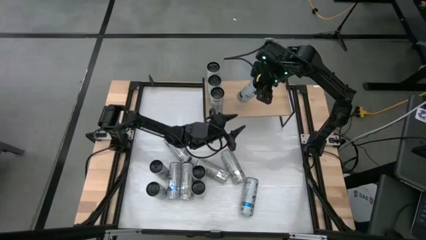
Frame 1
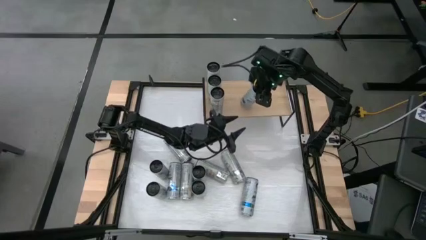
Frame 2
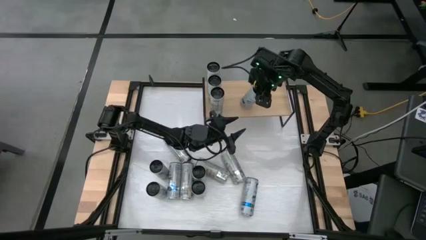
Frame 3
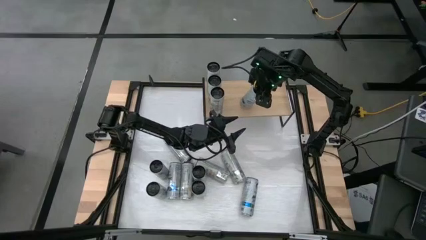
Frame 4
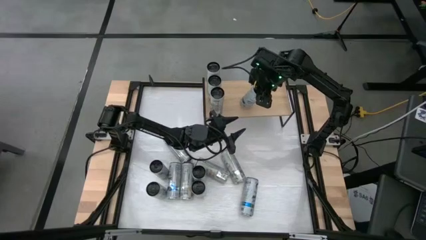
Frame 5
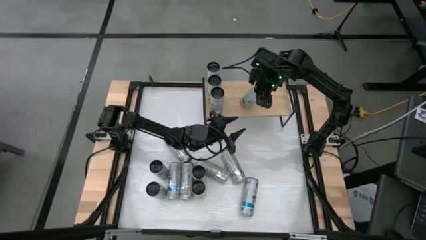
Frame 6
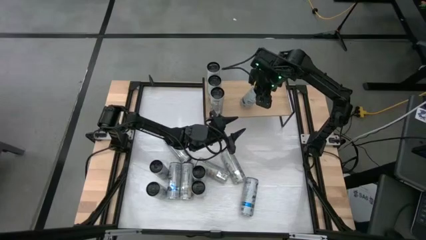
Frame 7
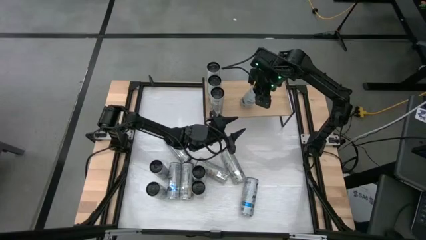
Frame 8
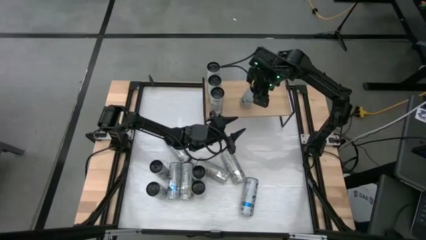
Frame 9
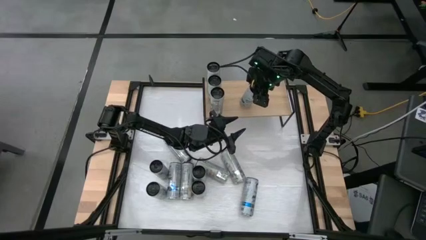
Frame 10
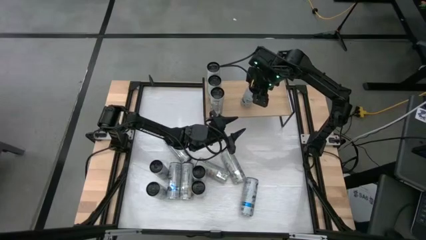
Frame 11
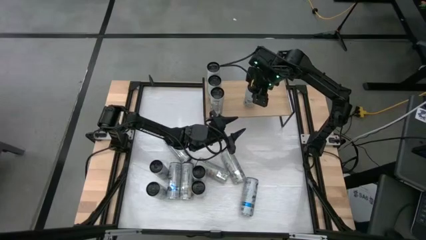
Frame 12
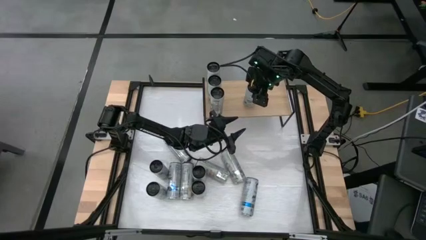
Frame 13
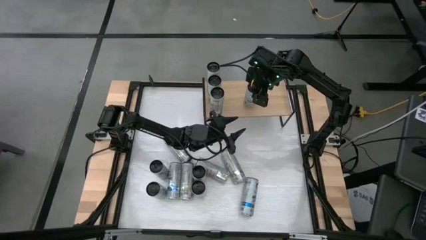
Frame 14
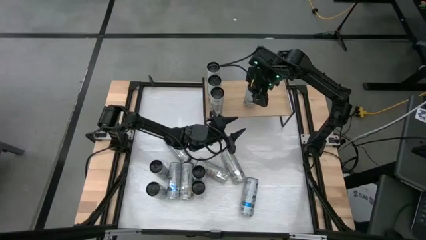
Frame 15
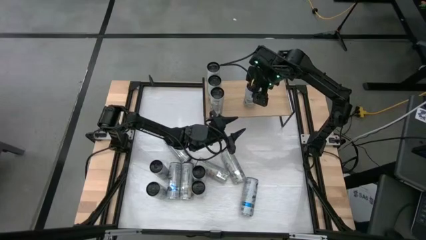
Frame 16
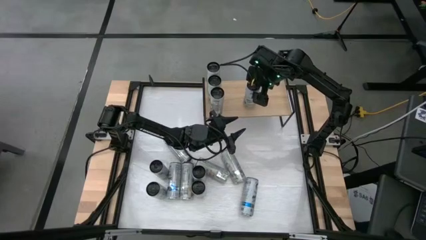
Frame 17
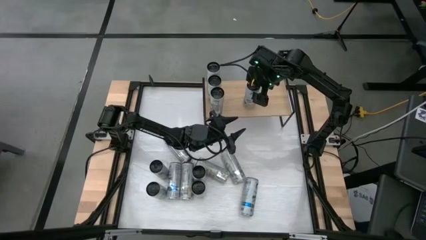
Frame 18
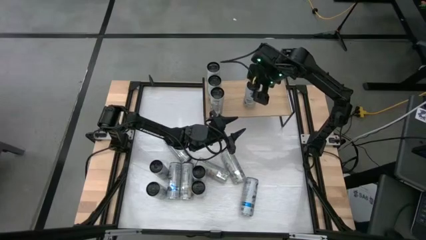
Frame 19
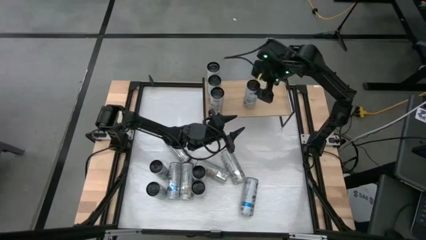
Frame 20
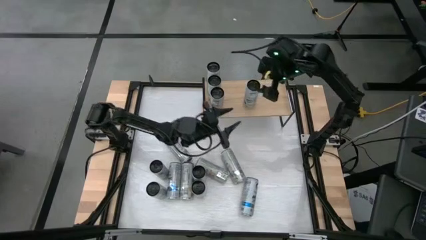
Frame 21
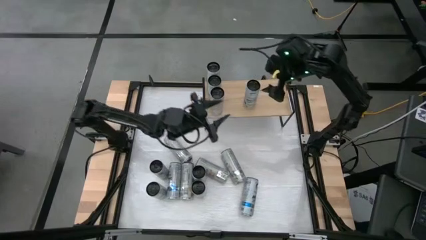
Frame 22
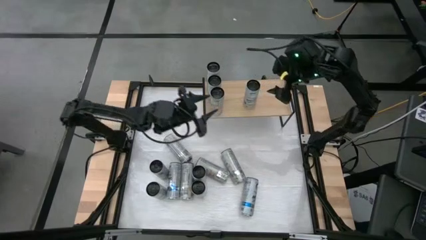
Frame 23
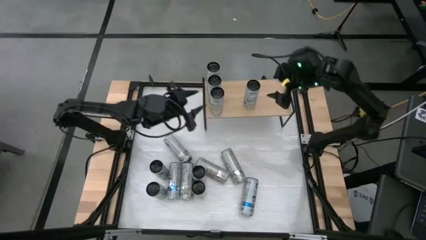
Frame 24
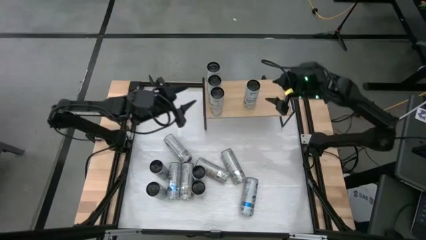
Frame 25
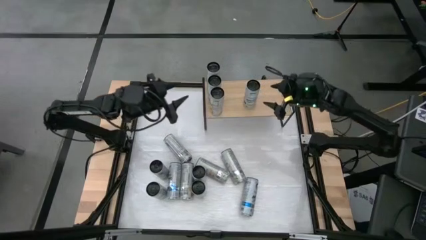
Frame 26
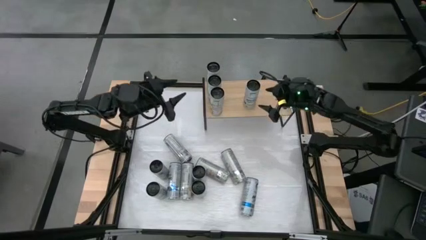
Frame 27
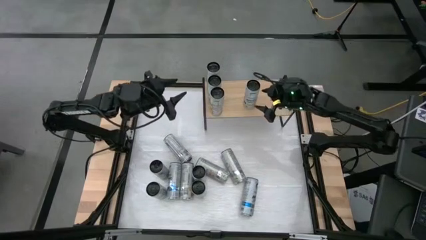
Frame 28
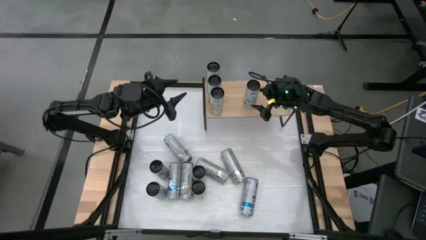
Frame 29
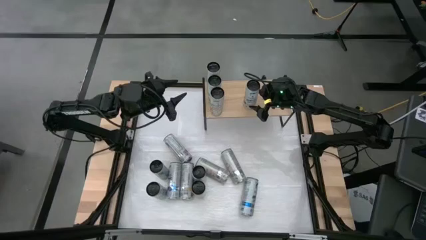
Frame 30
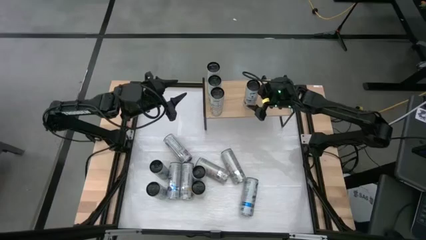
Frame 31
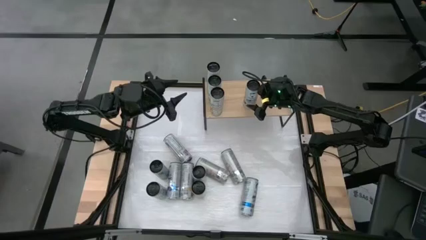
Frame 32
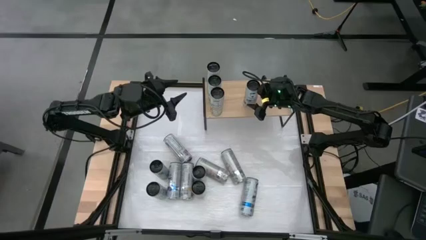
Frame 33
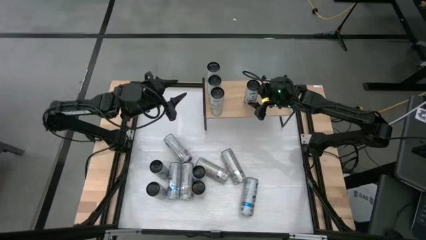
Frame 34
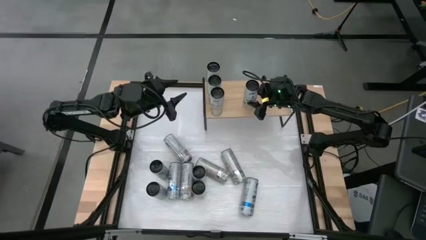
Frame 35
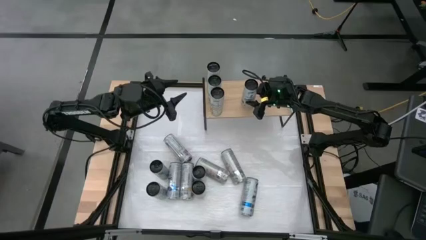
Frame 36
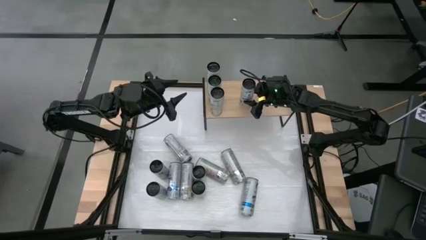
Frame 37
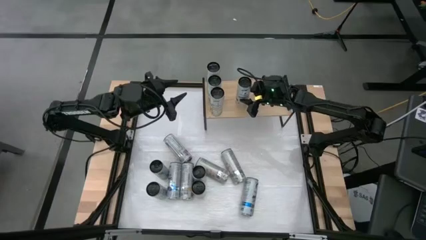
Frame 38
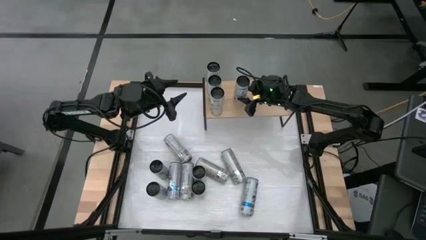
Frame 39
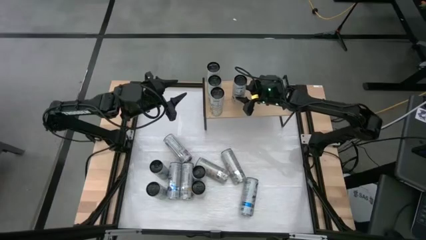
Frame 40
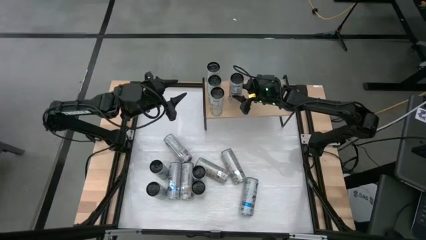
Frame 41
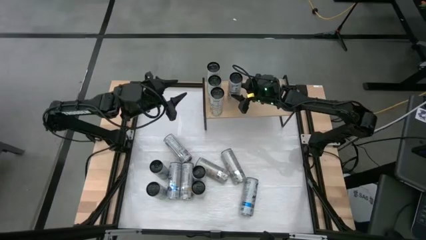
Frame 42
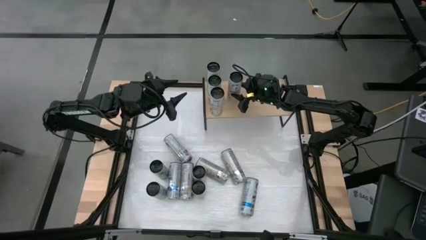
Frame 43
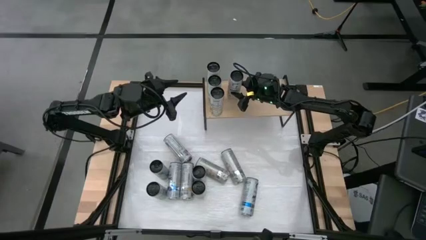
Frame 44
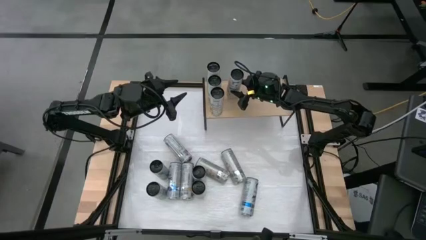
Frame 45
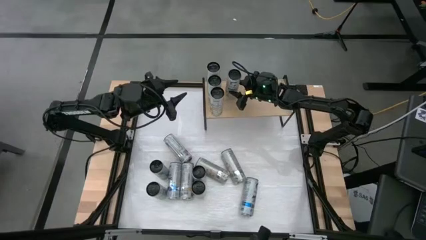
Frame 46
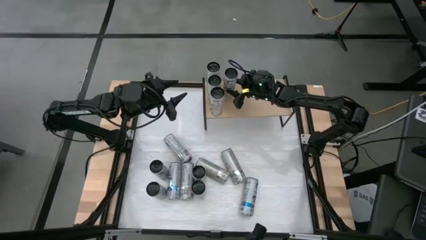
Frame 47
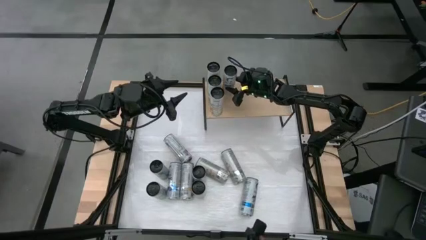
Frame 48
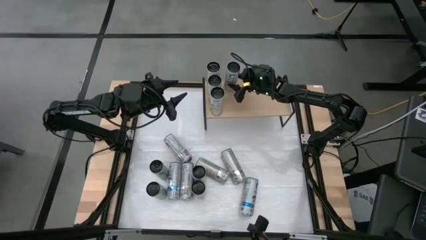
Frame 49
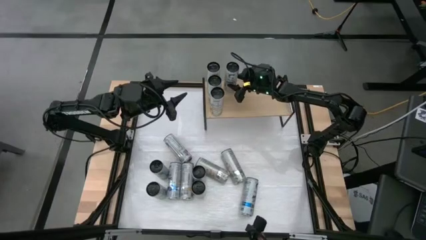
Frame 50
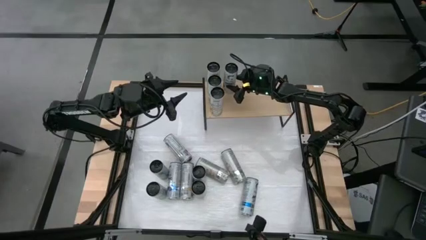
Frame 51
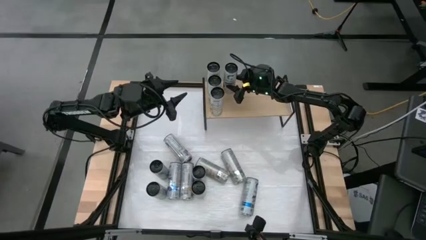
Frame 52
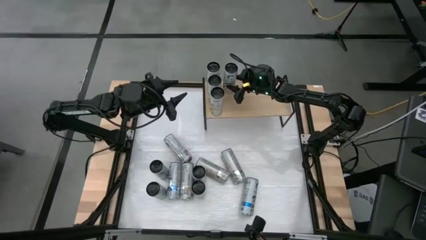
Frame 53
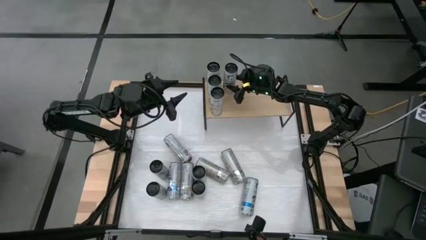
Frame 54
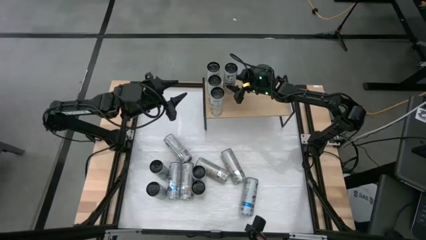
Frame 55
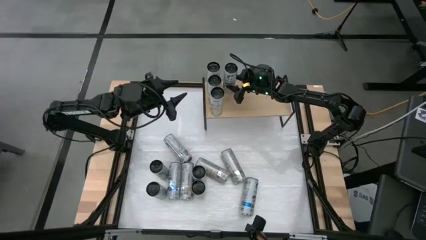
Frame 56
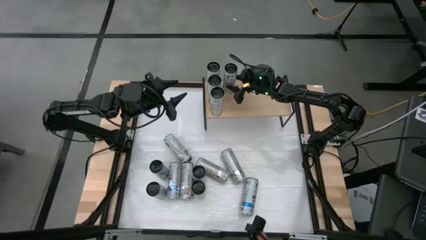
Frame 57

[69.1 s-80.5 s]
Task: Place canned beverage on shelf
Put the blue soda can on the shelf

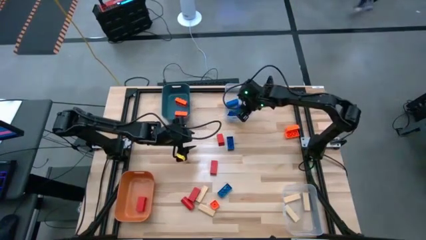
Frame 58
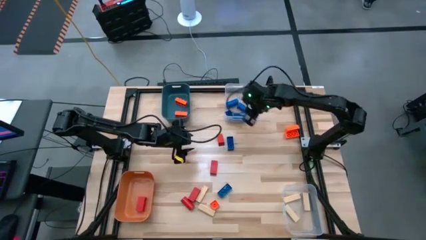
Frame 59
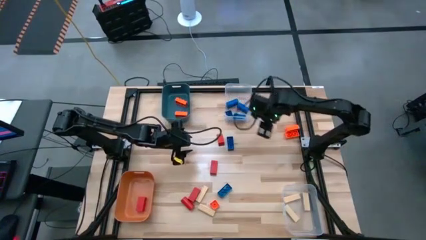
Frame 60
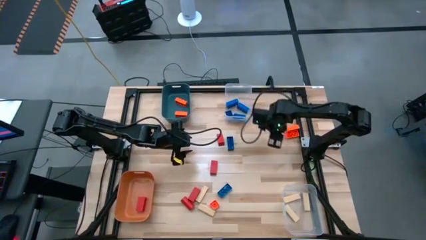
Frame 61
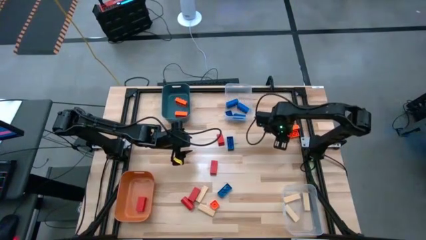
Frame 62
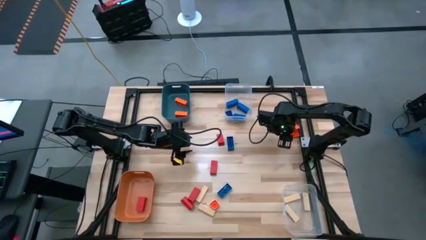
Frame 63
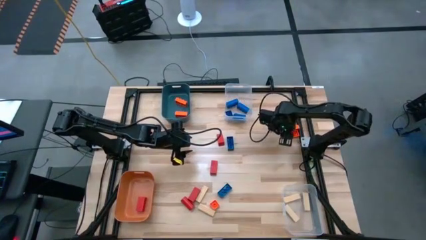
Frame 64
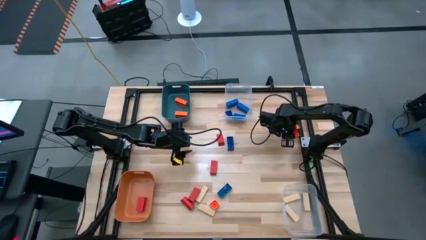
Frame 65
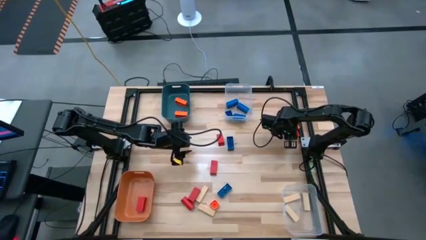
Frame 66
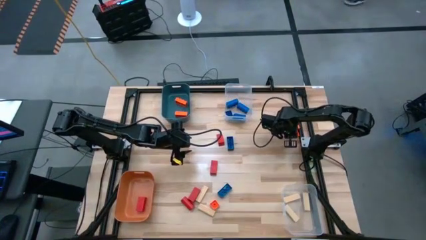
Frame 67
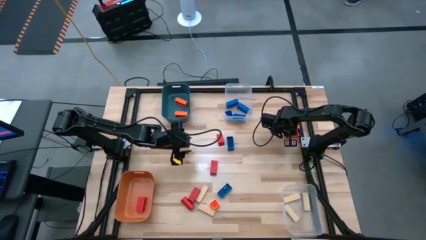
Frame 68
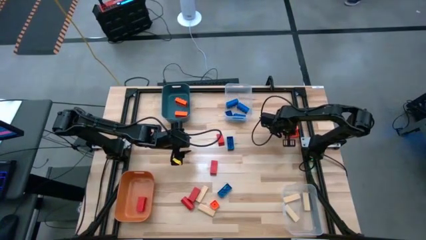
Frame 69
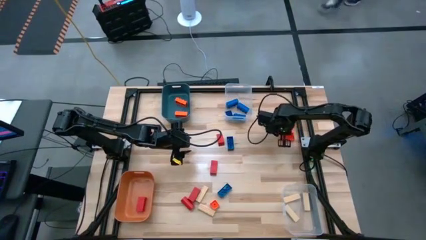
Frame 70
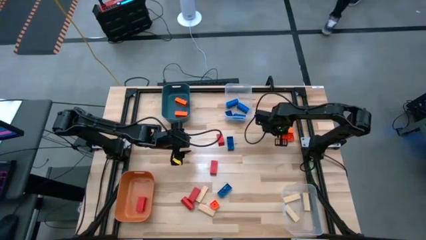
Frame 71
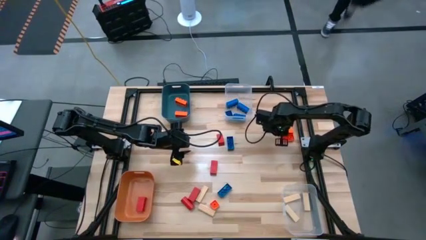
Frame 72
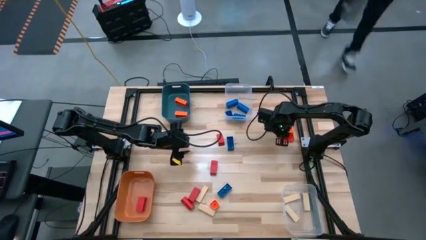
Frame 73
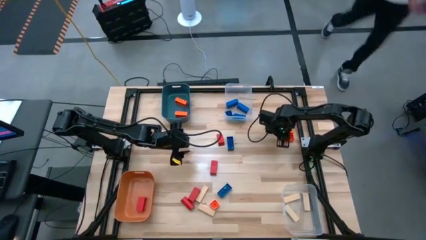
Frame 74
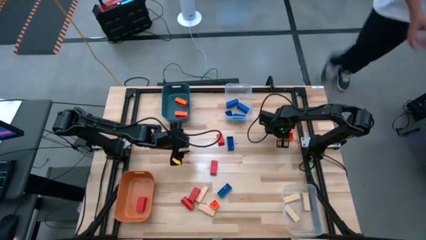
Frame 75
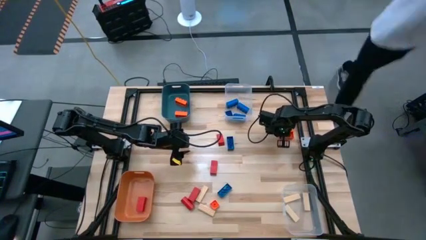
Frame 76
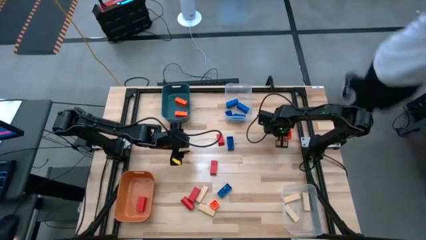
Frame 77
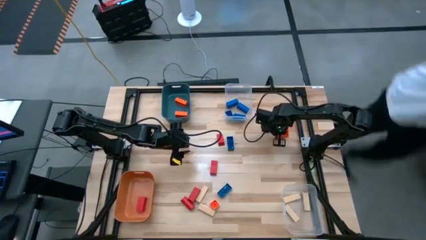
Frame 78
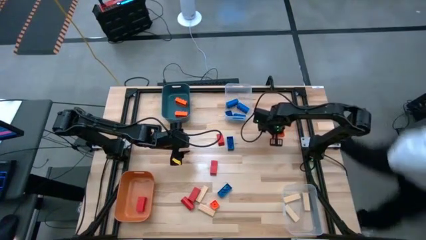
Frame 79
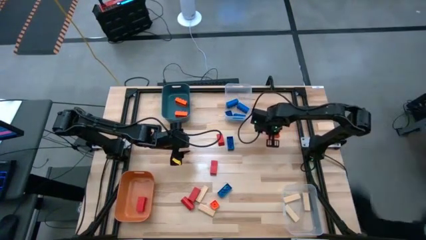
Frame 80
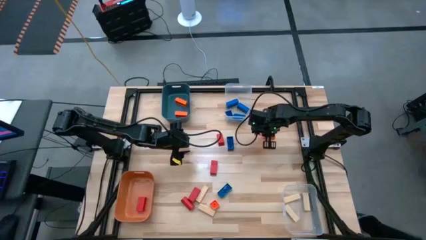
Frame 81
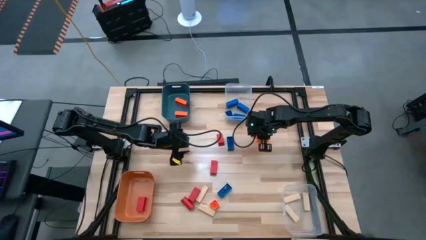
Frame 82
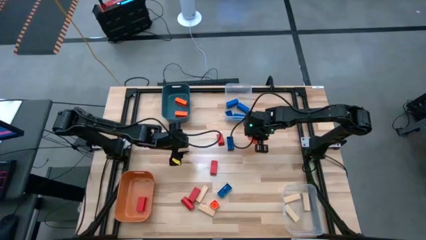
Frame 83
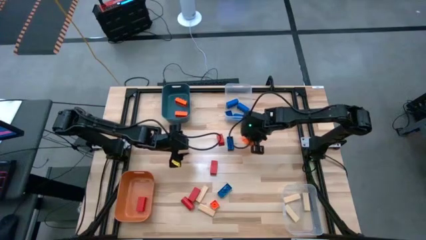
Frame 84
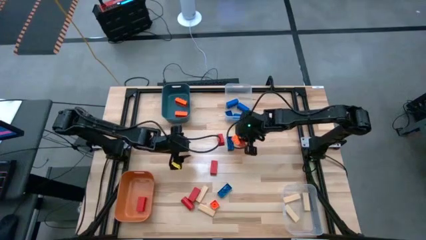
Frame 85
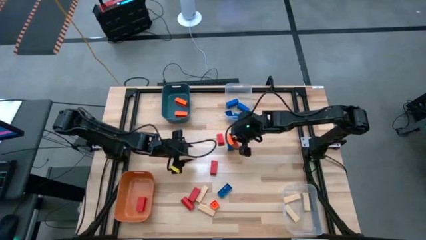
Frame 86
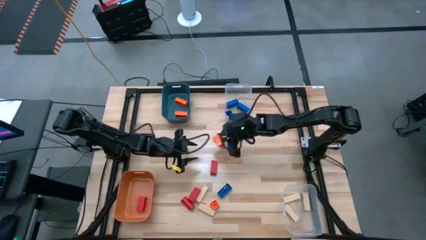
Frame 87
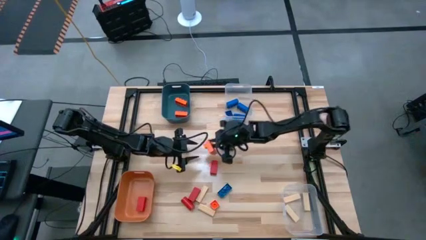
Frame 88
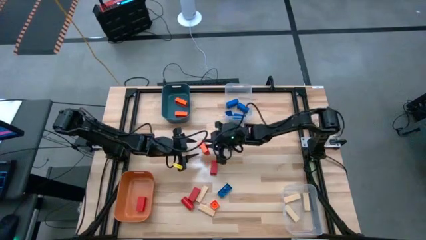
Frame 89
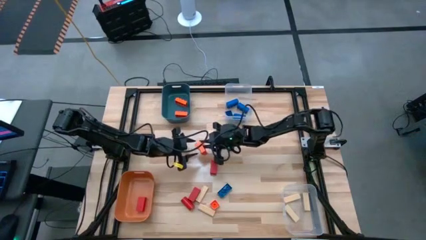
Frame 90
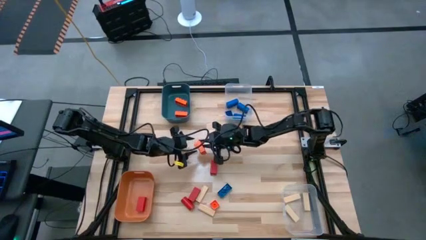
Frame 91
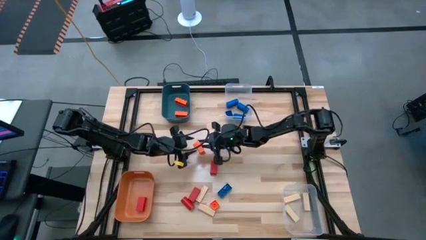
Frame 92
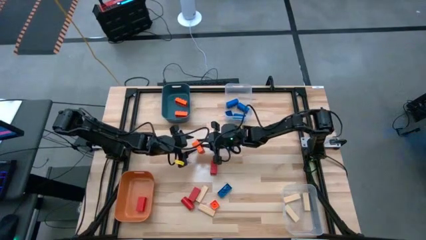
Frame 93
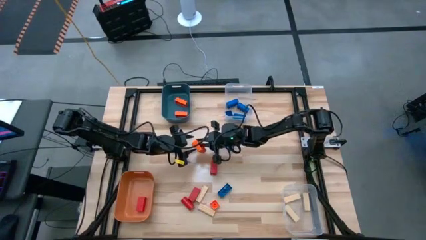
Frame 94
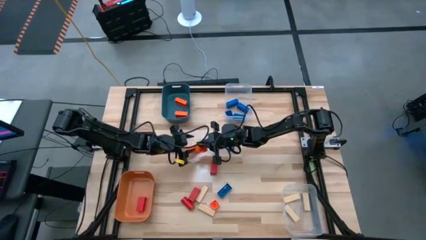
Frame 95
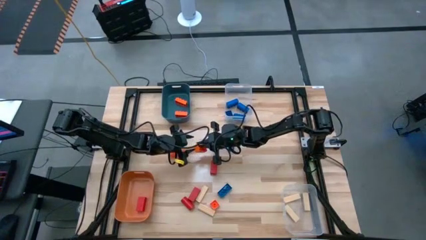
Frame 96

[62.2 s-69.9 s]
Task: Sort blocks
Put the orange game piece into the blue bin
